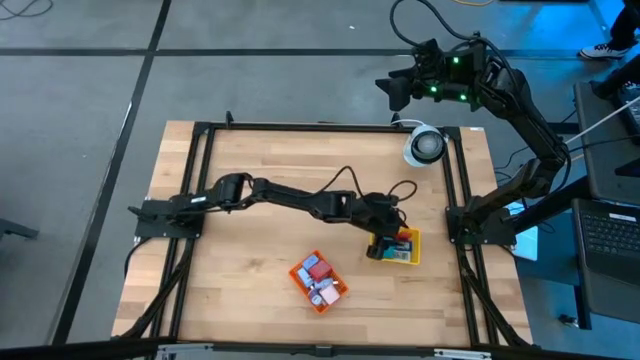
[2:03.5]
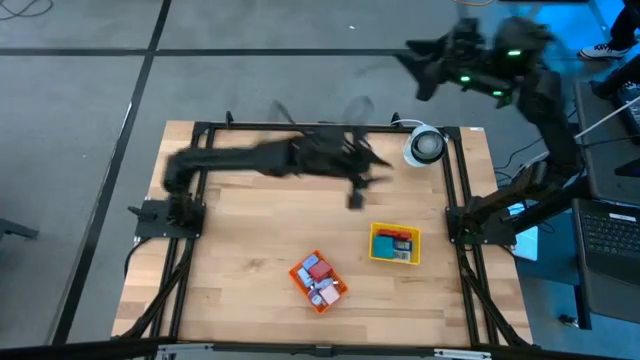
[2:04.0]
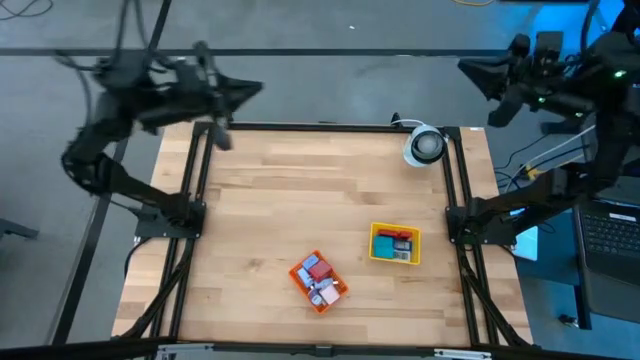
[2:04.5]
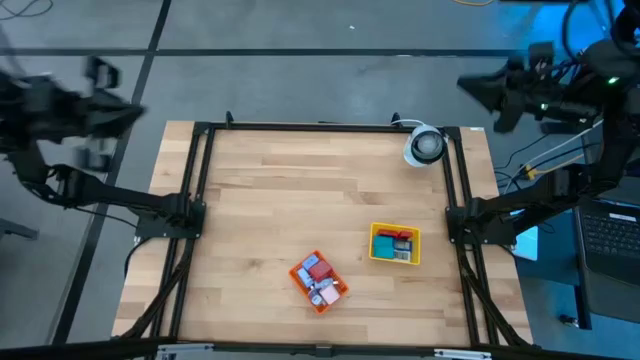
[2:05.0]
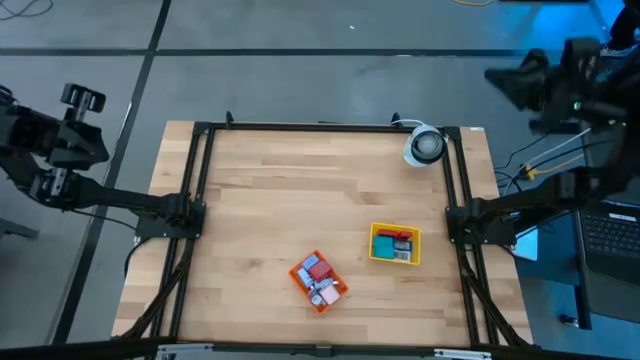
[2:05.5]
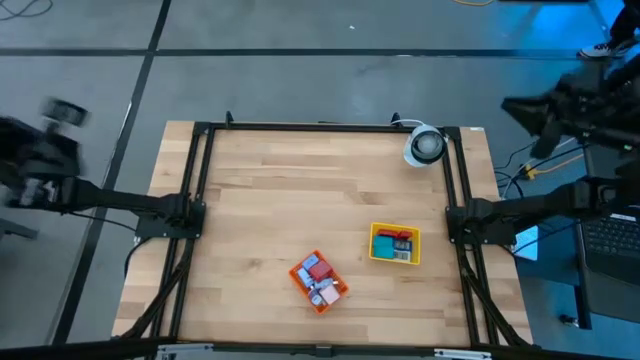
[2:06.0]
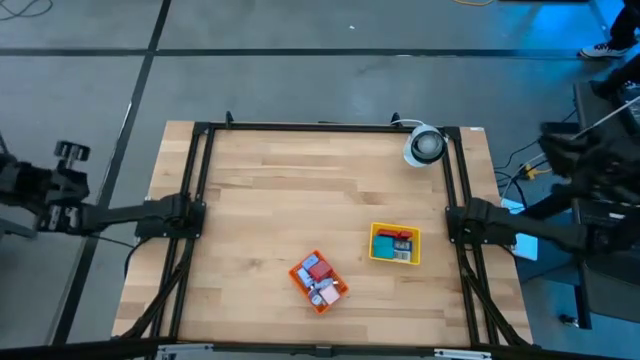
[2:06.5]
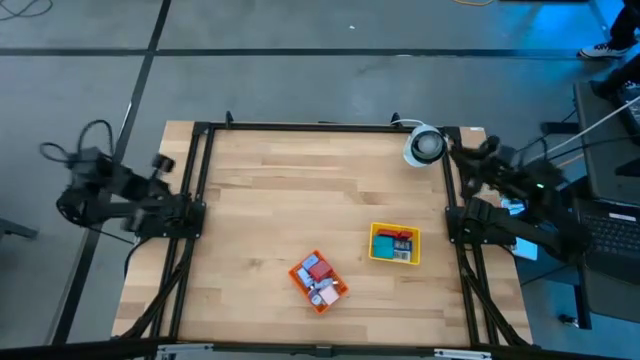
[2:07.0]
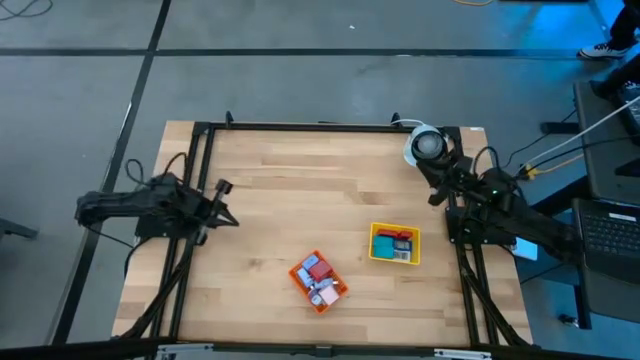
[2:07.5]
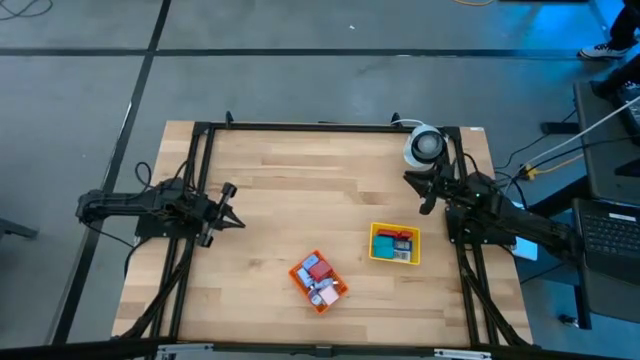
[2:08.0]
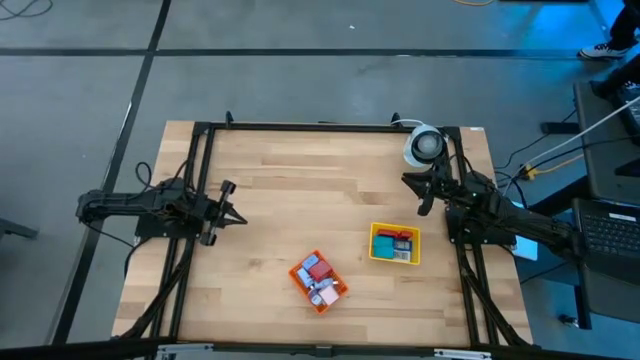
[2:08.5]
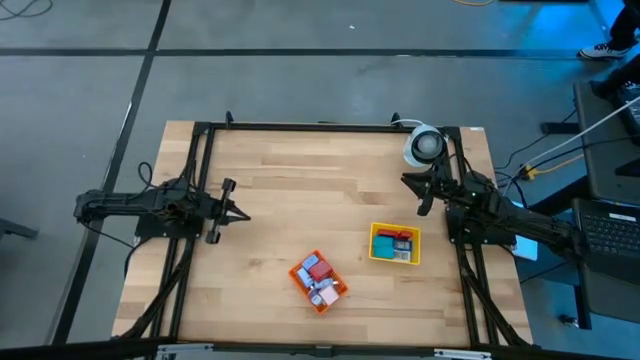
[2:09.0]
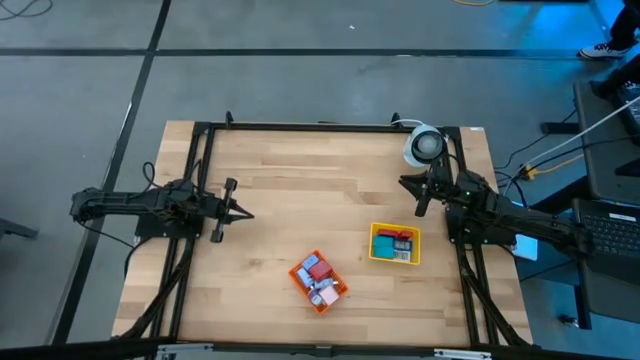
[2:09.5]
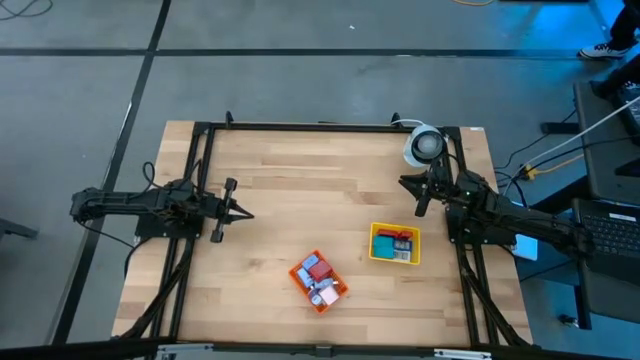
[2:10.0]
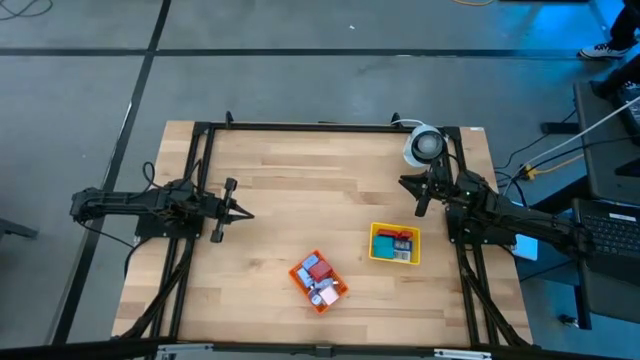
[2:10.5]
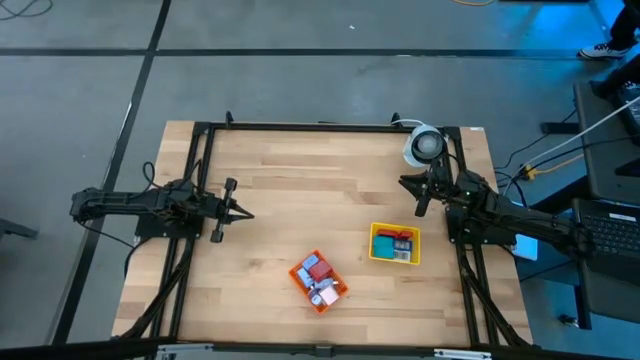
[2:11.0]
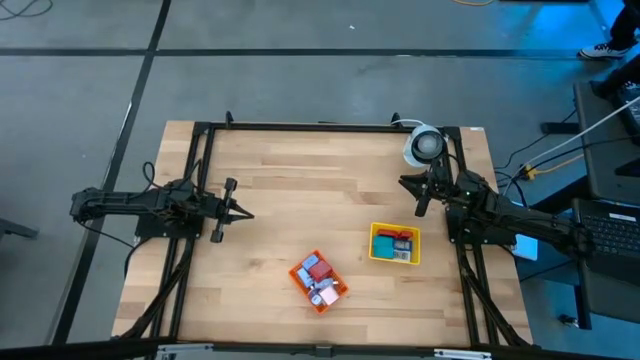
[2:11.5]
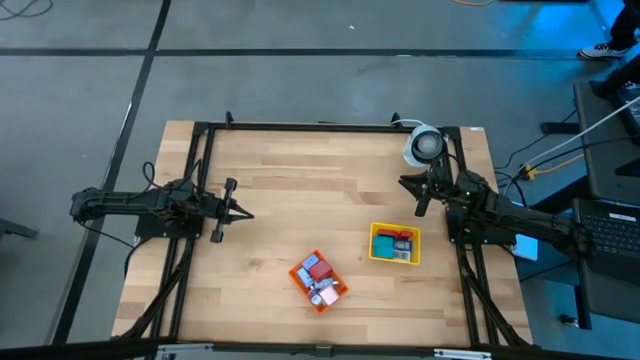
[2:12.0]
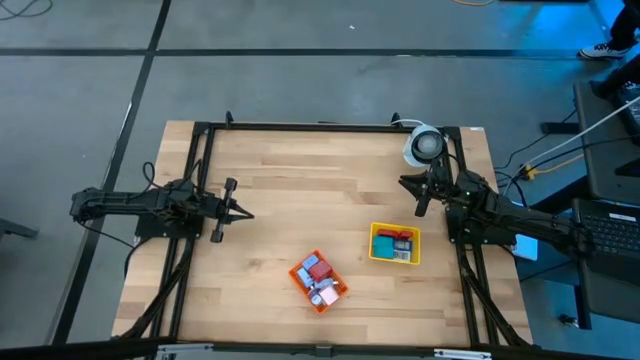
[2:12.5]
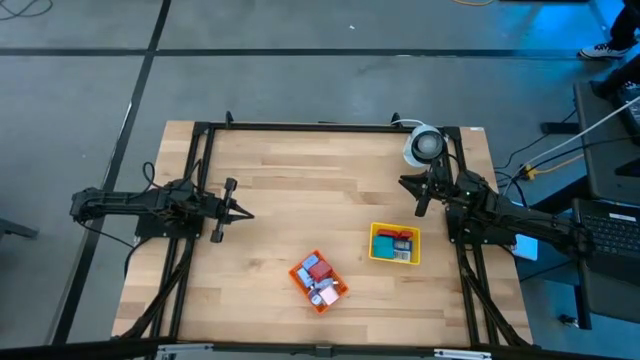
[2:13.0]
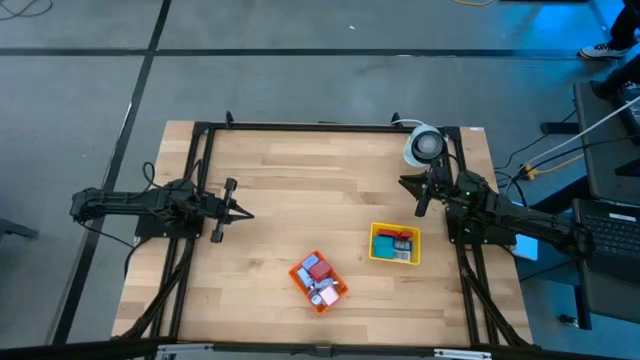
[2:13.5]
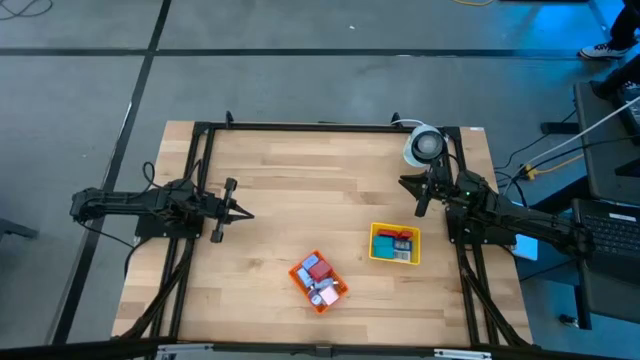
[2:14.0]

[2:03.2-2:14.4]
Task: Pick & Place Office items
Return to Home Position

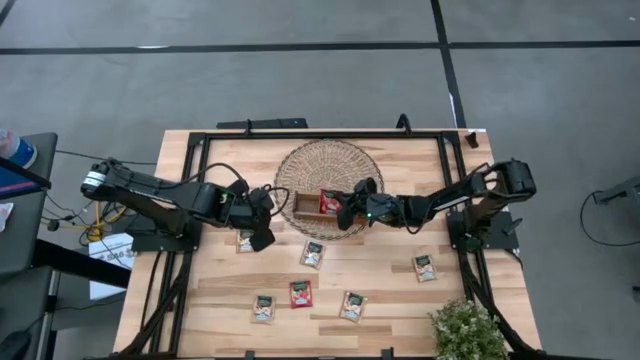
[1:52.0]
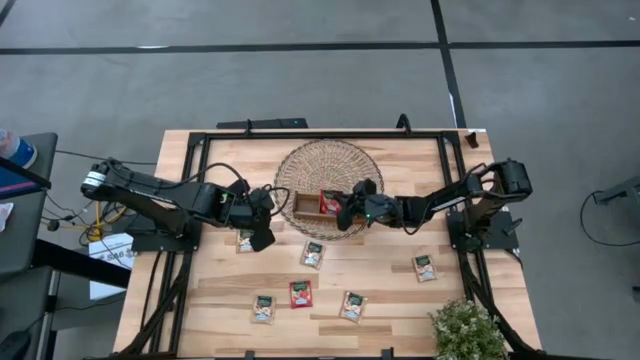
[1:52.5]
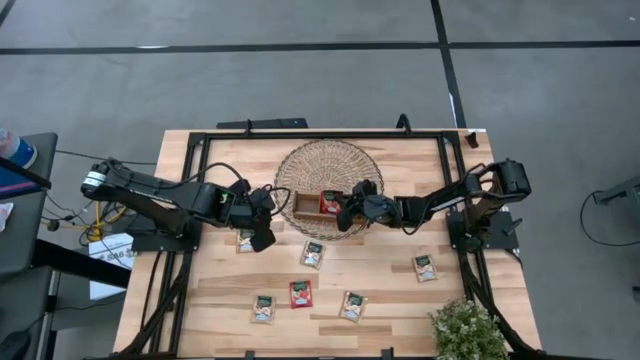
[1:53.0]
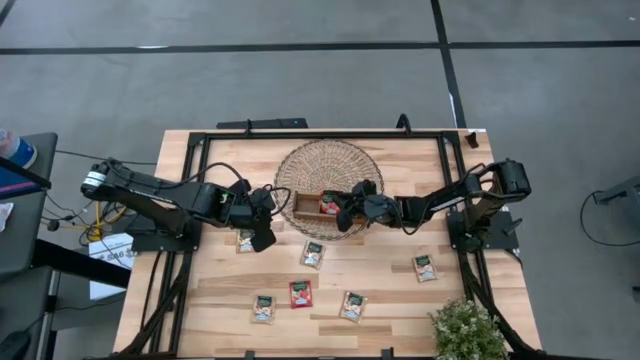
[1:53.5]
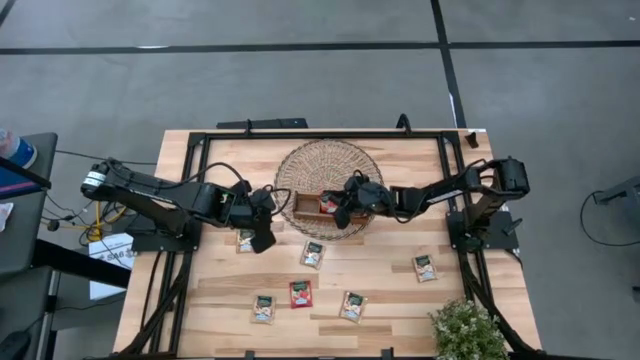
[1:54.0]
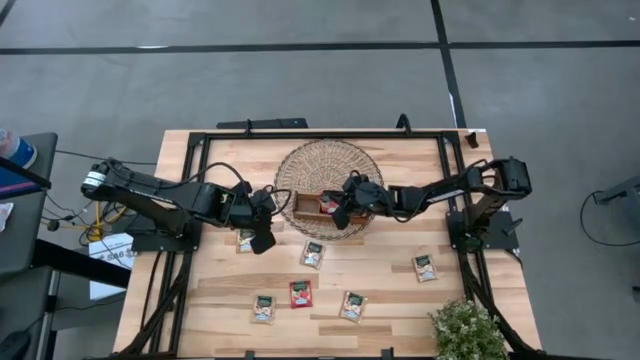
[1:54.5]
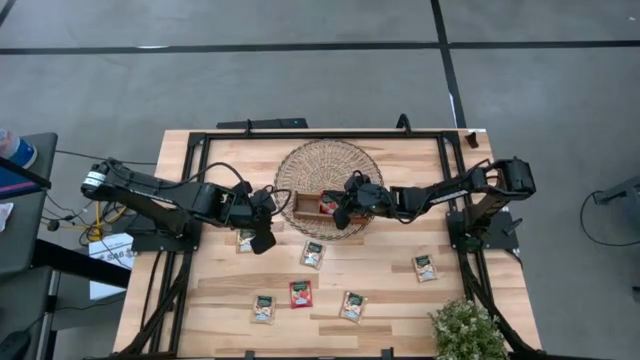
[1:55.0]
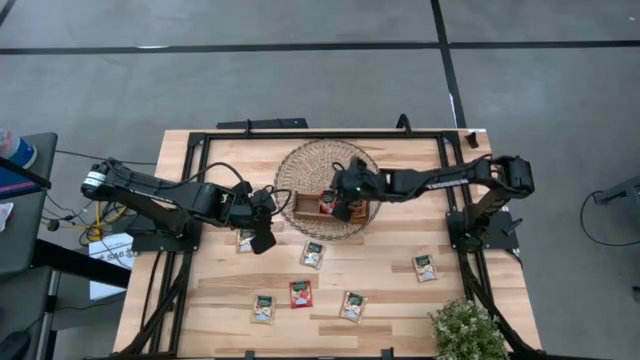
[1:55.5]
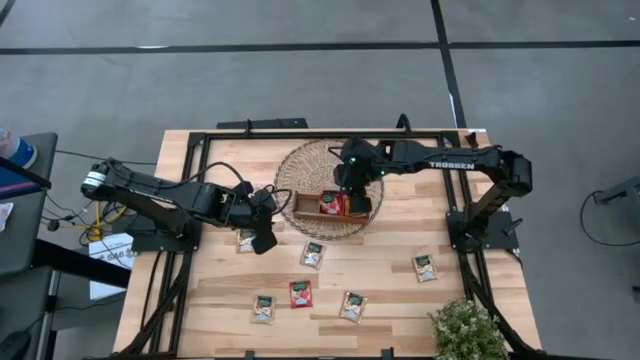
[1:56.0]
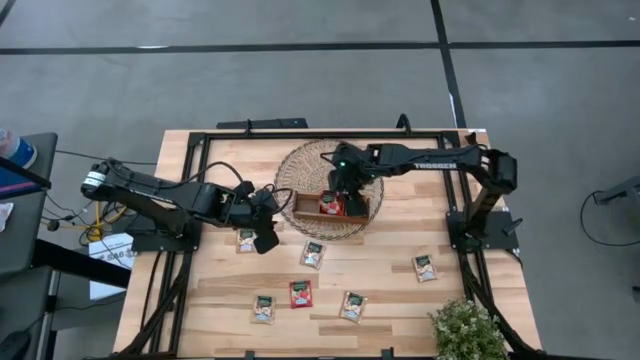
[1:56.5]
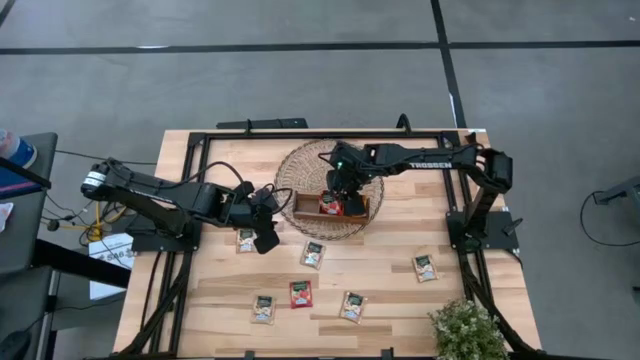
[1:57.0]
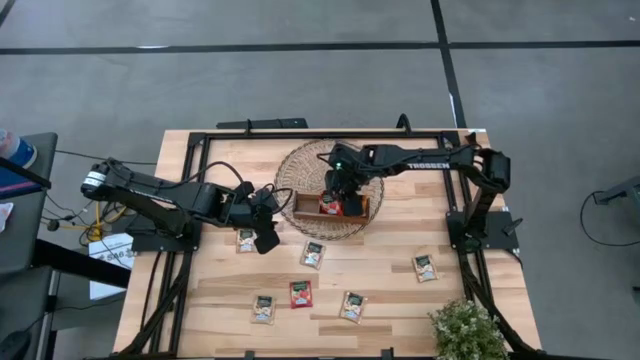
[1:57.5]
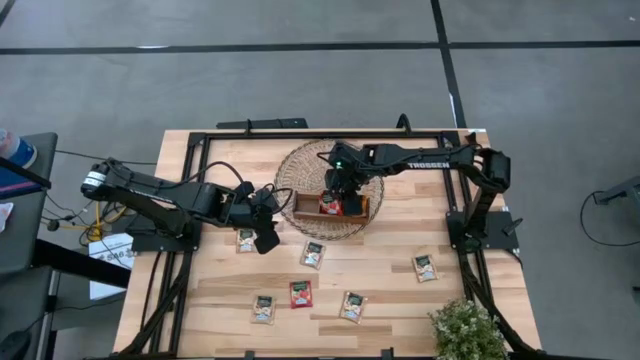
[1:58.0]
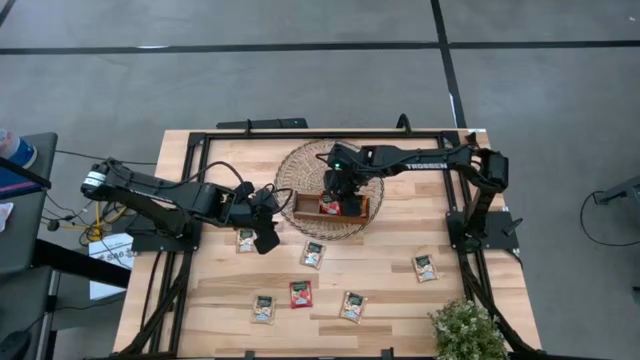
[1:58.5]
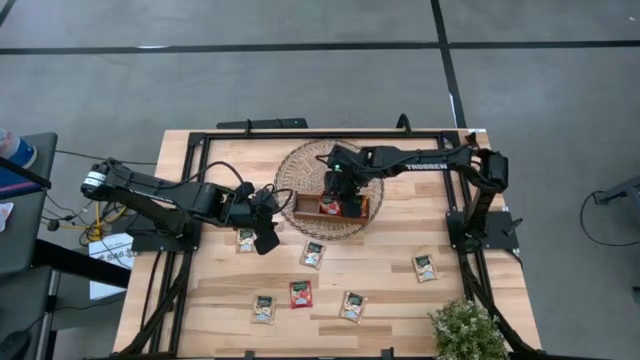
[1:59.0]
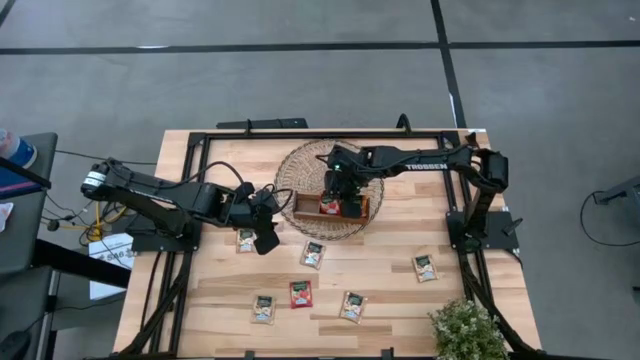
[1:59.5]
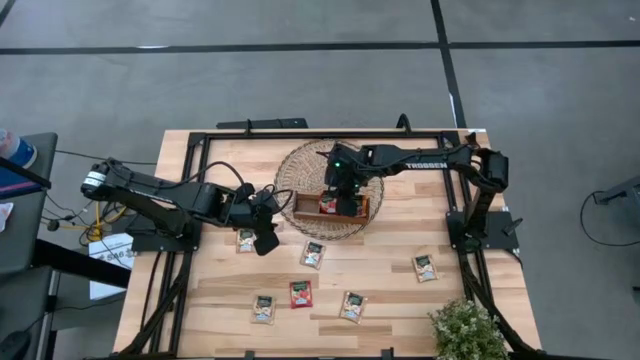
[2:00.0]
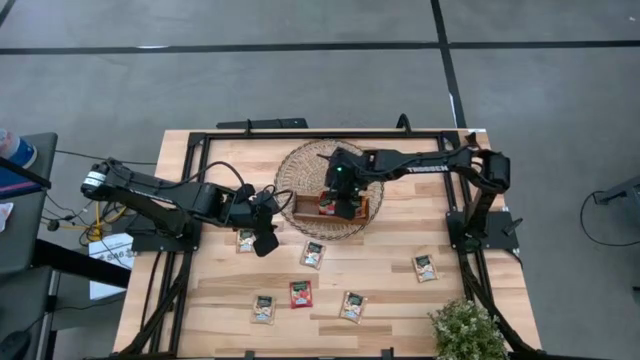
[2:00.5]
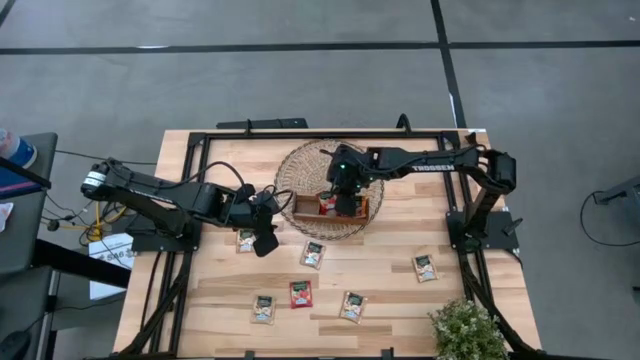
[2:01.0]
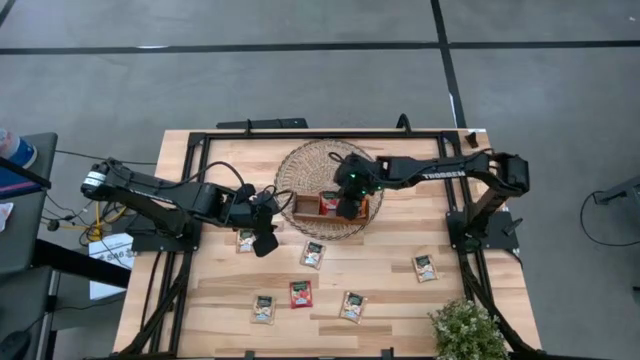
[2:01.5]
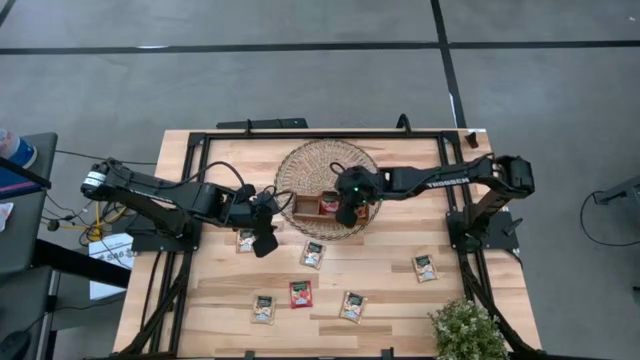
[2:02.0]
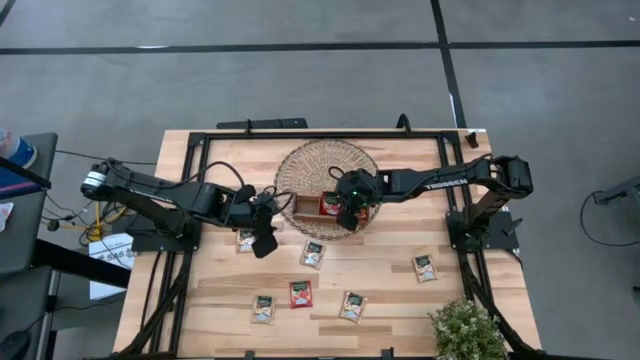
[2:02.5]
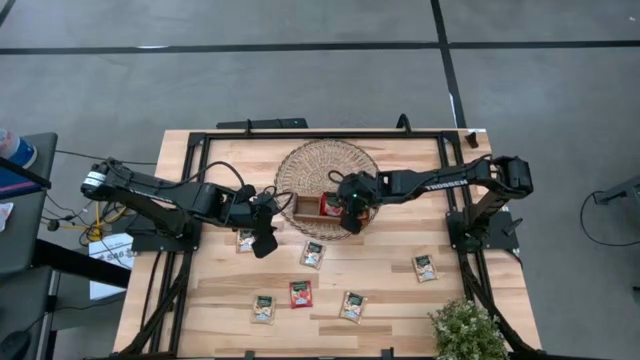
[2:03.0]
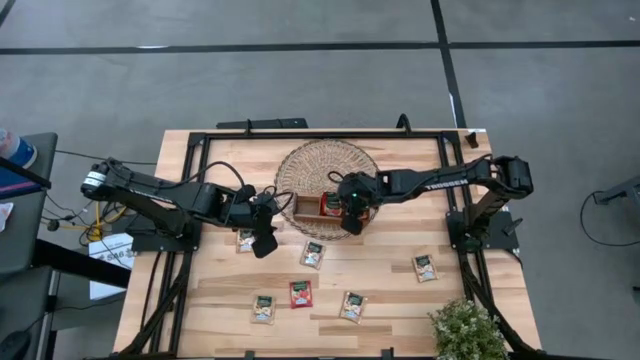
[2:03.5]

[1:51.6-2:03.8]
Task: Pick & Place Tea
Put the red tea bag into the middle section of the wooden organizer
